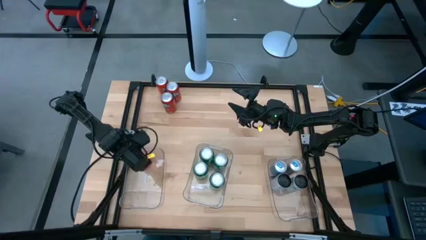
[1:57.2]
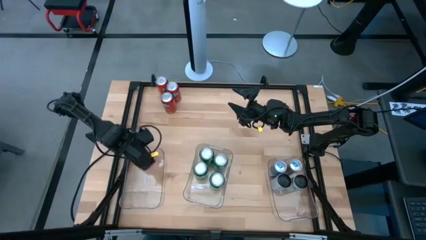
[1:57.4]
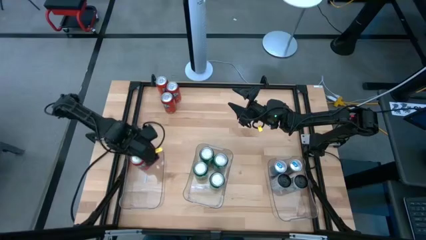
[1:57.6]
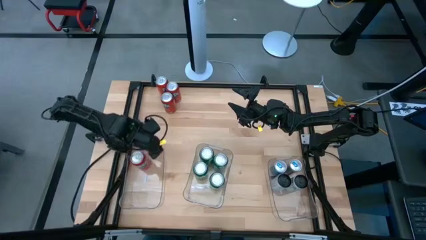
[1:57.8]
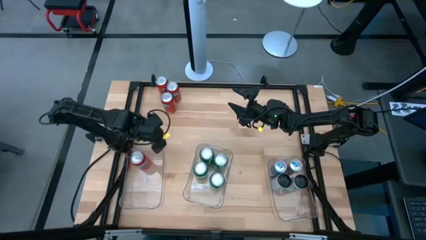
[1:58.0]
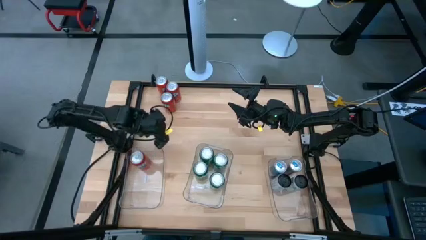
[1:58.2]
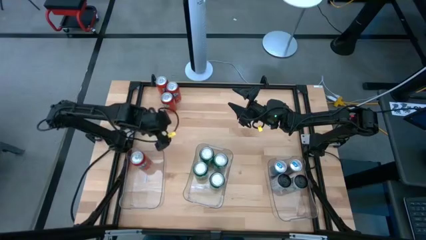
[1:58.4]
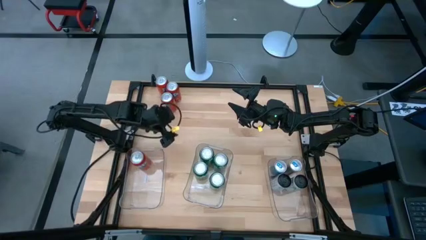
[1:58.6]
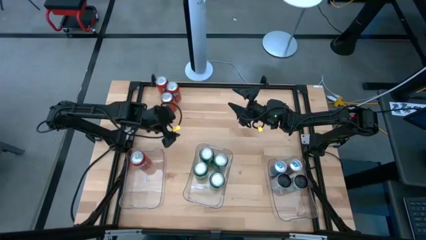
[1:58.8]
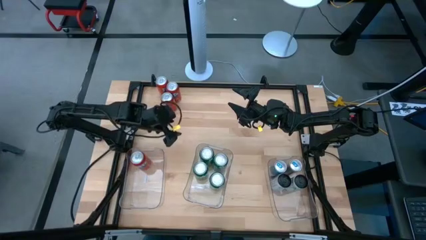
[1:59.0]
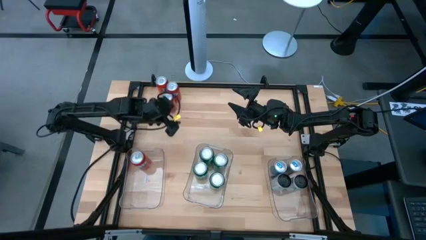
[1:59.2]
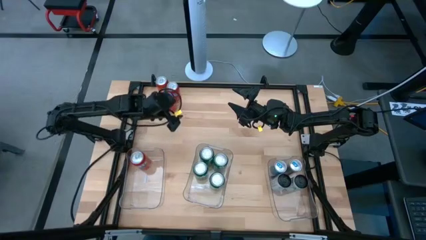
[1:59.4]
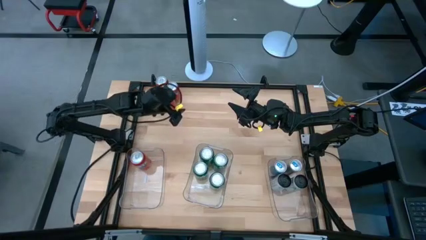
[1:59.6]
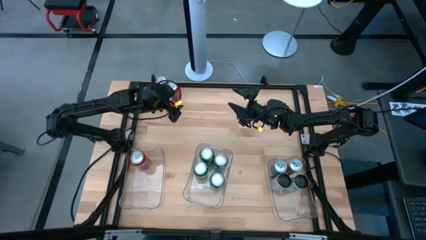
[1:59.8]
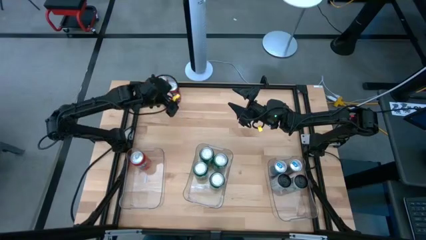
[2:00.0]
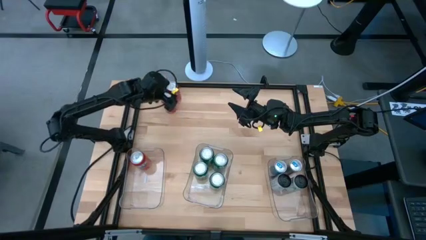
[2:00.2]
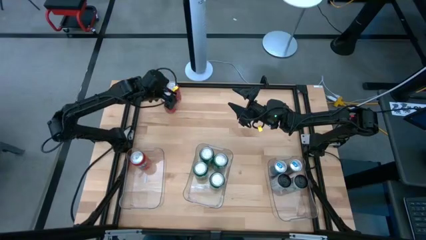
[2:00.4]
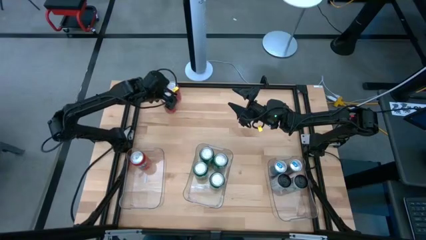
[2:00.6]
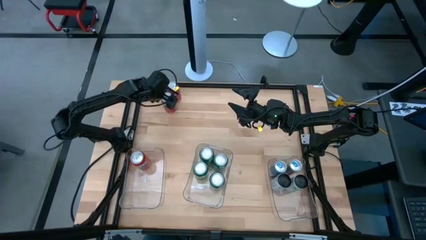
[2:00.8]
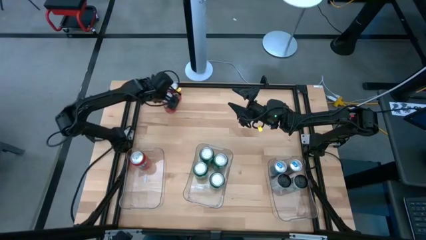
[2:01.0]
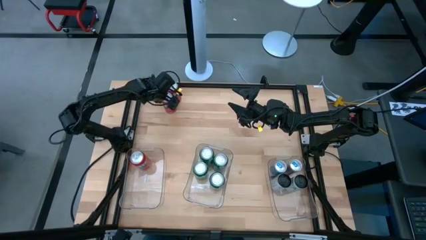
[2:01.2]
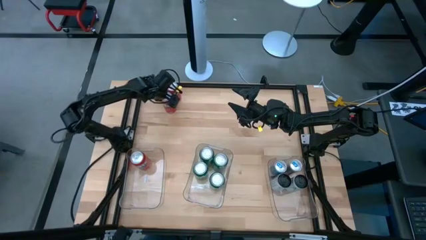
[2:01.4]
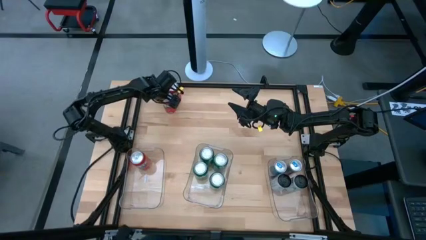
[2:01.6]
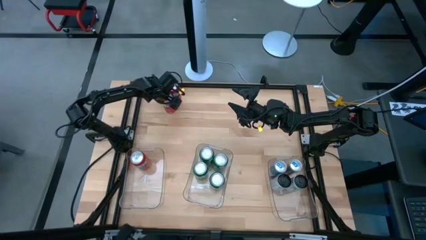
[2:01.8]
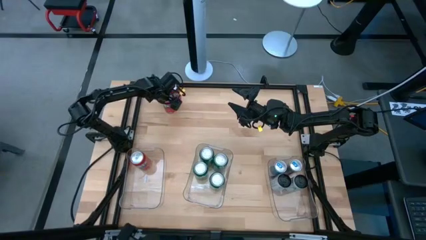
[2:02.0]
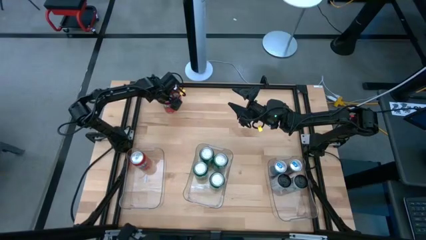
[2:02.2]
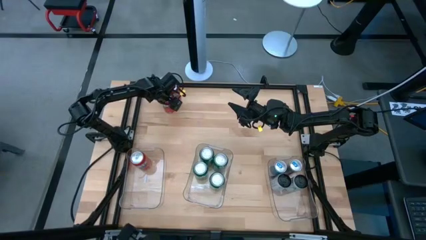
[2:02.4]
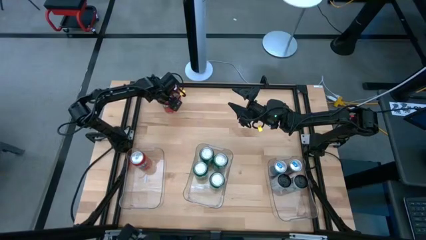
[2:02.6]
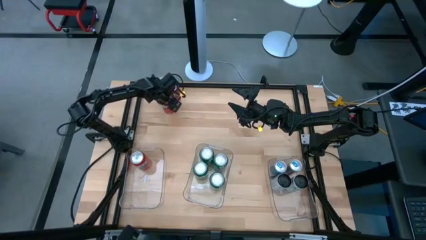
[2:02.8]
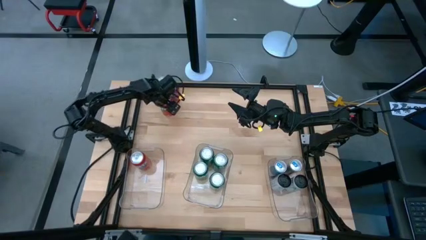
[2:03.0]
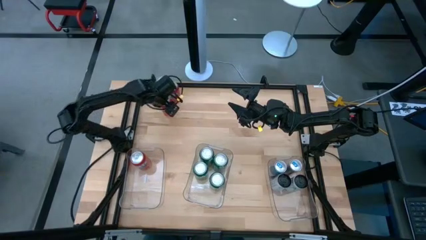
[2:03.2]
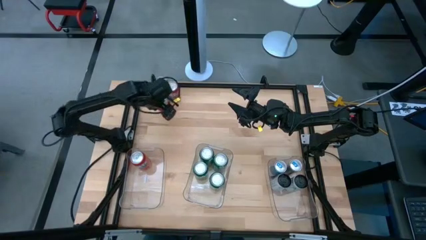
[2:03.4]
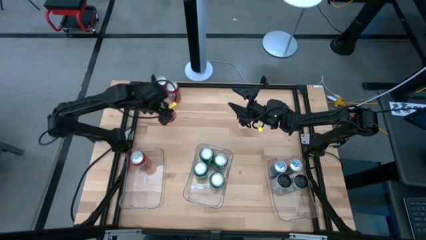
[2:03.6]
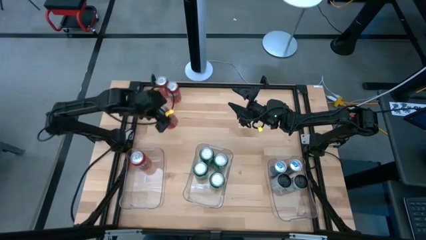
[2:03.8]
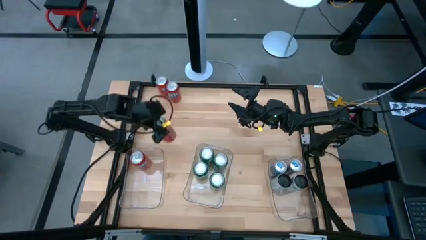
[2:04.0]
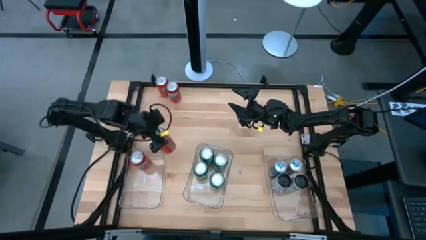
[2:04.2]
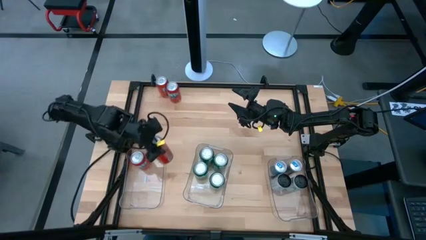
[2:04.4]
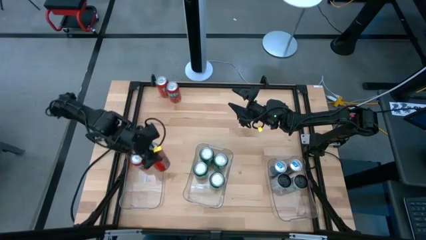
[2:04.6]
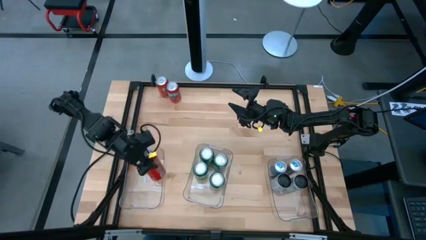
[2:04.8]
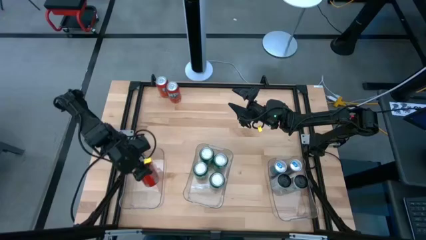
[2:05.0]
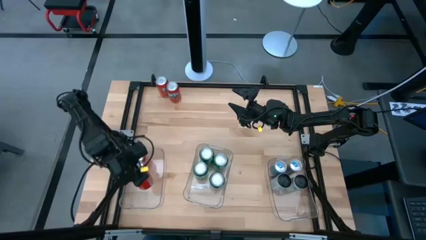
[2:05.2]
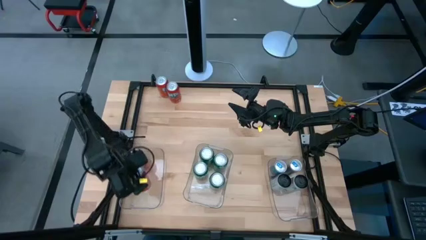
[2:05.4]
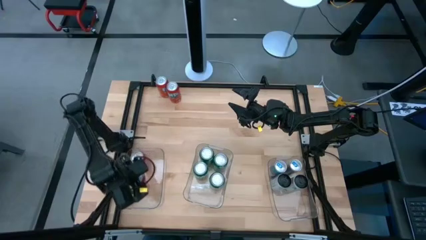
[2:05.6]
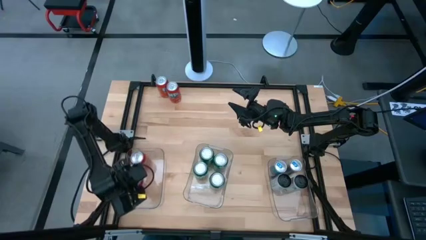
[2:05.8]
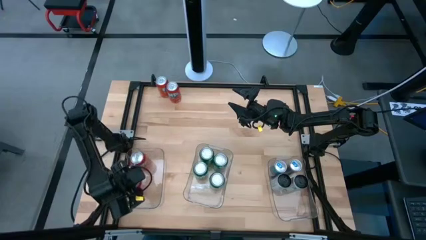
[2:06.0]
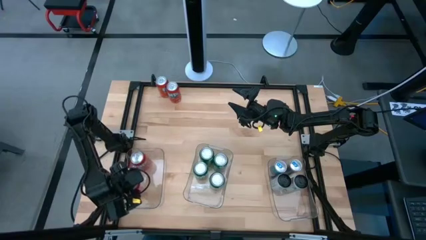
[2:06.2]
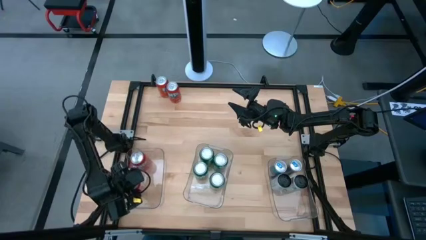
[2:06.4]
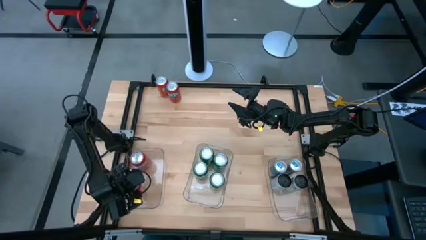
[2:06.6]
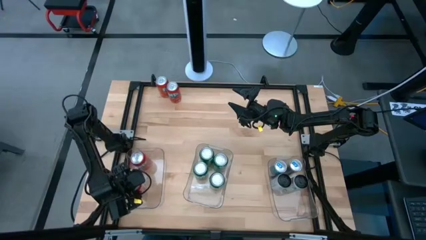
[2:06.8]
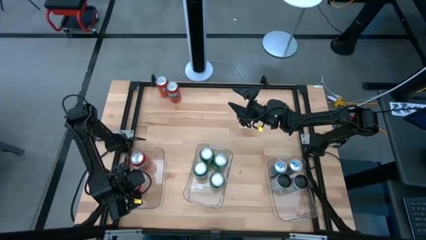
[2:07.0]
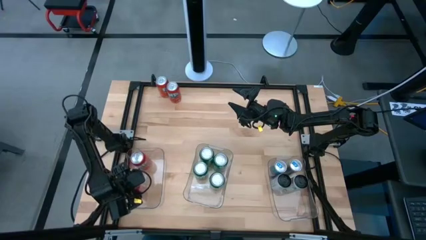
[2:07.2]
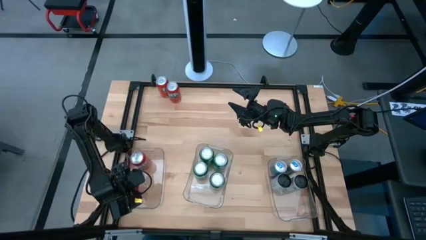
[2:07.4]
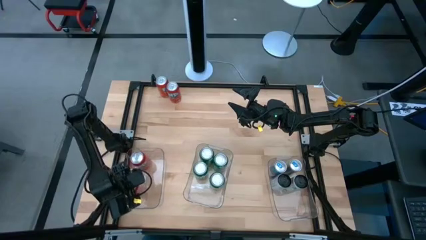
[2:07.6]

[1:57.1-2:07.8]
Task: Sort soda cans
Put the orange soda can into the left transparent bin
